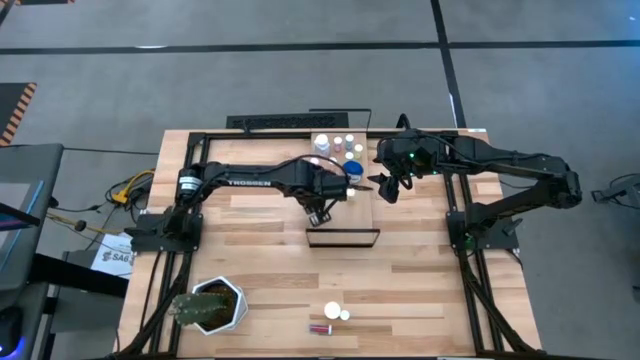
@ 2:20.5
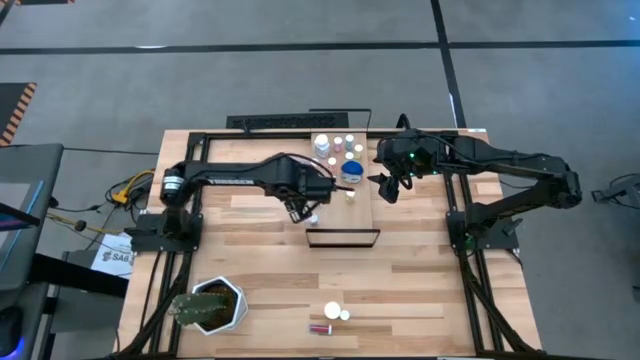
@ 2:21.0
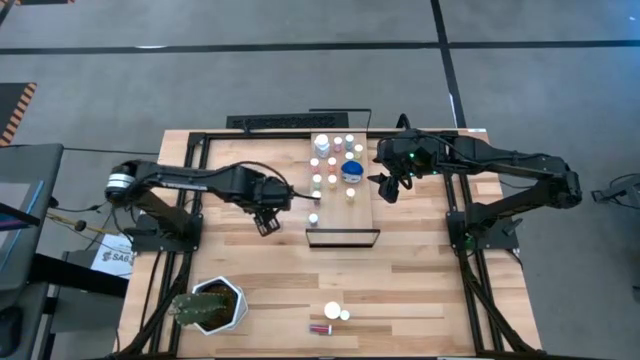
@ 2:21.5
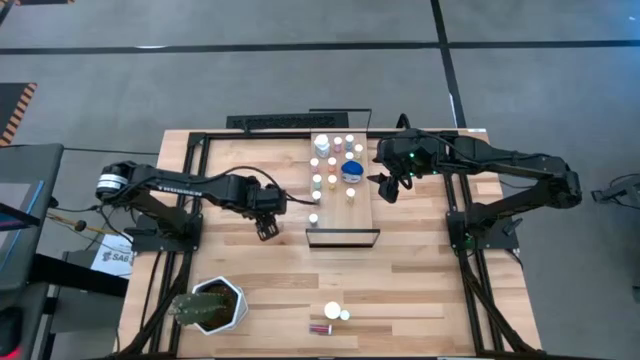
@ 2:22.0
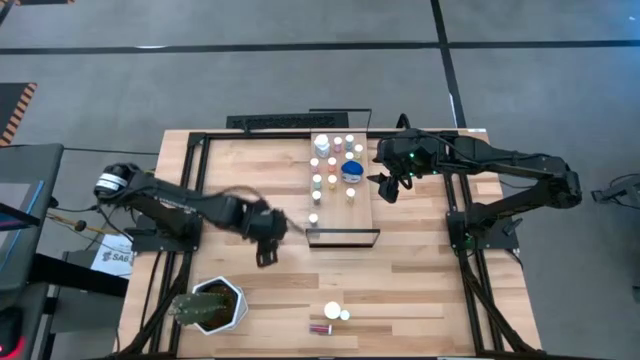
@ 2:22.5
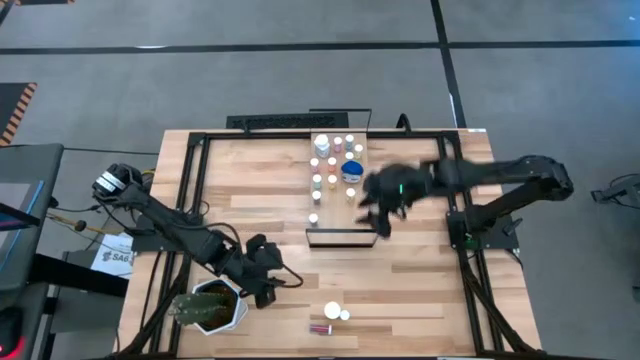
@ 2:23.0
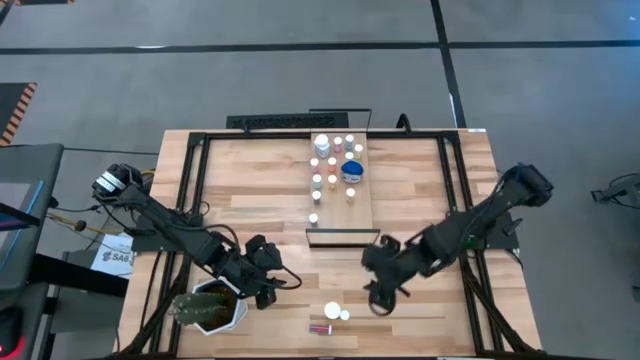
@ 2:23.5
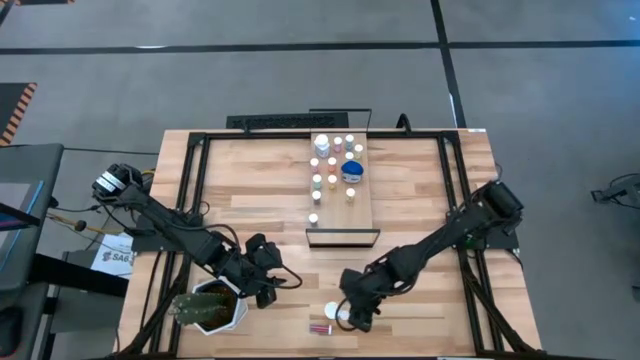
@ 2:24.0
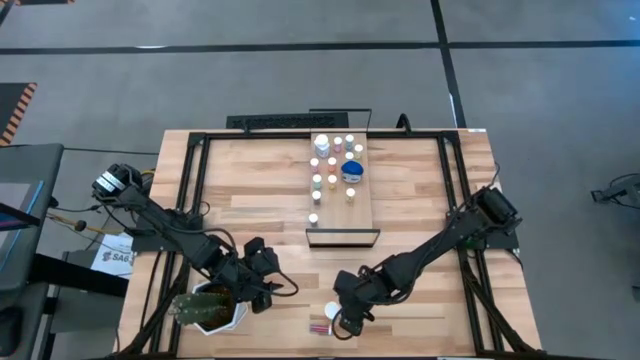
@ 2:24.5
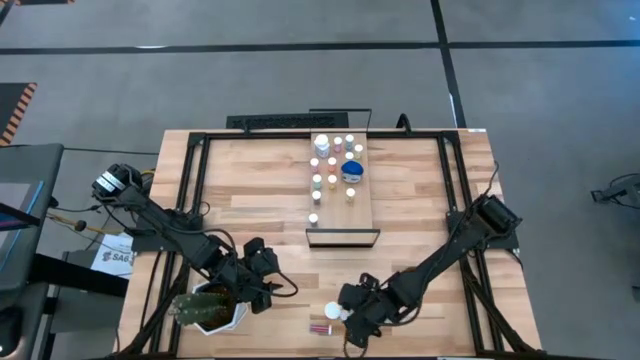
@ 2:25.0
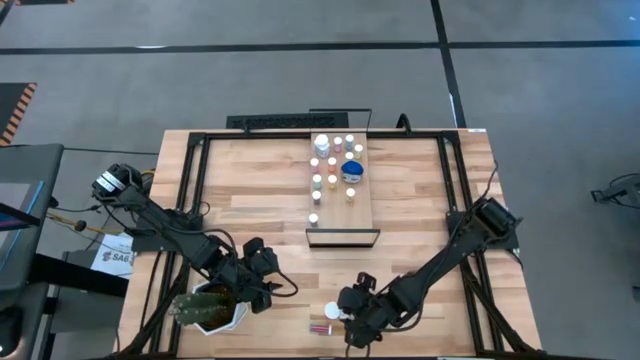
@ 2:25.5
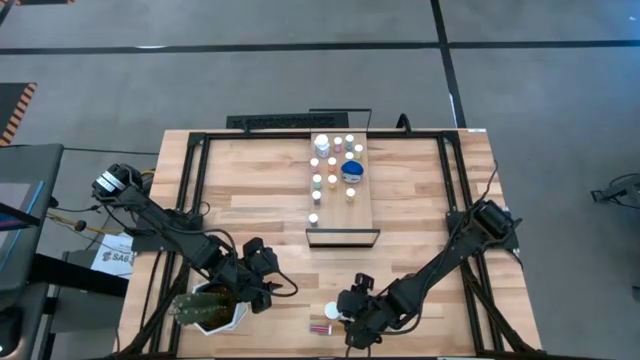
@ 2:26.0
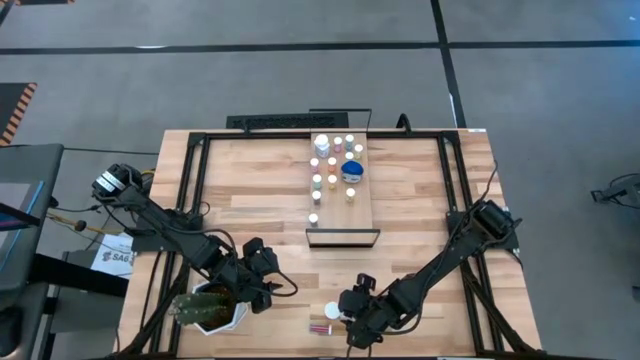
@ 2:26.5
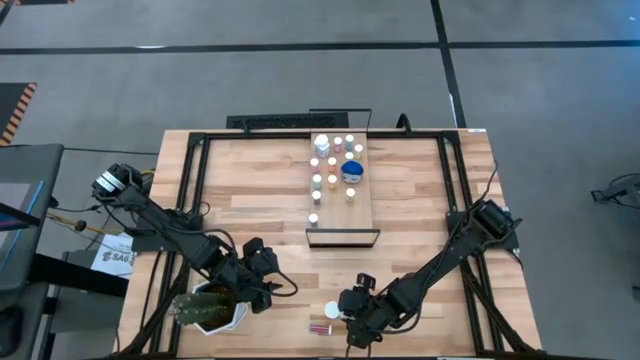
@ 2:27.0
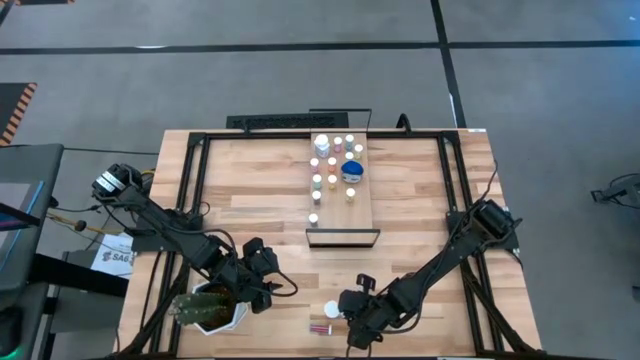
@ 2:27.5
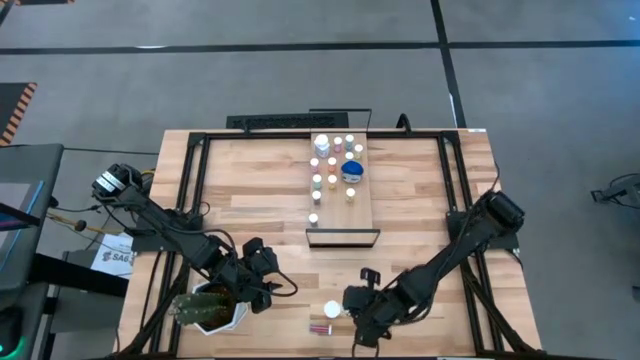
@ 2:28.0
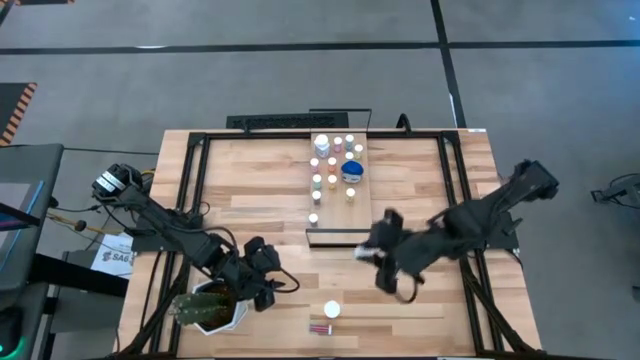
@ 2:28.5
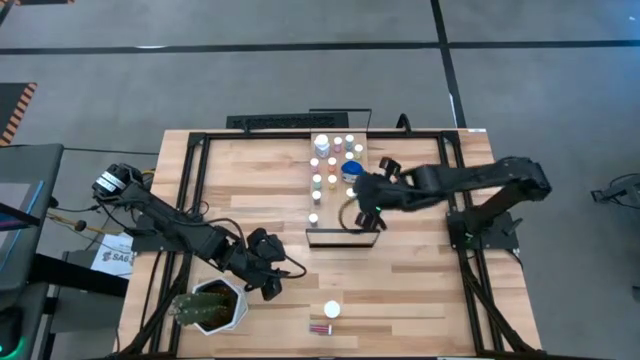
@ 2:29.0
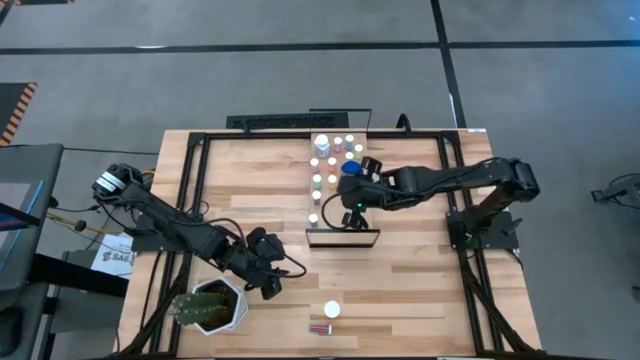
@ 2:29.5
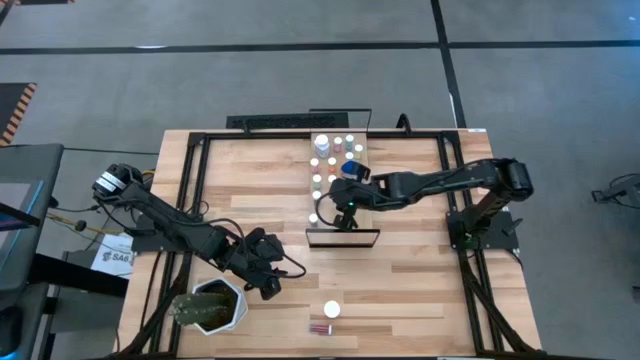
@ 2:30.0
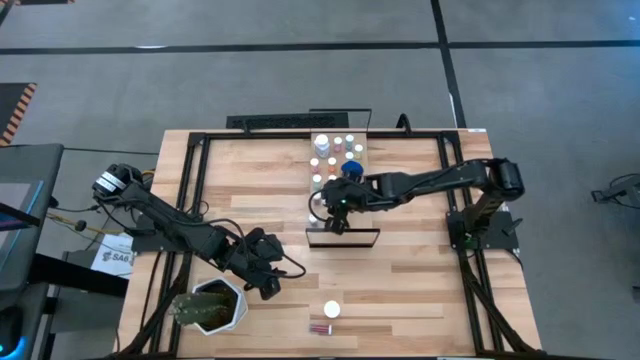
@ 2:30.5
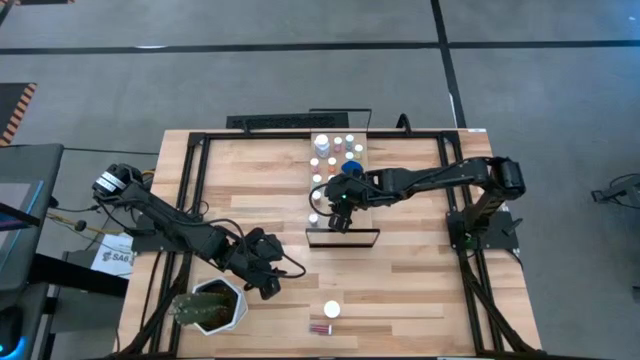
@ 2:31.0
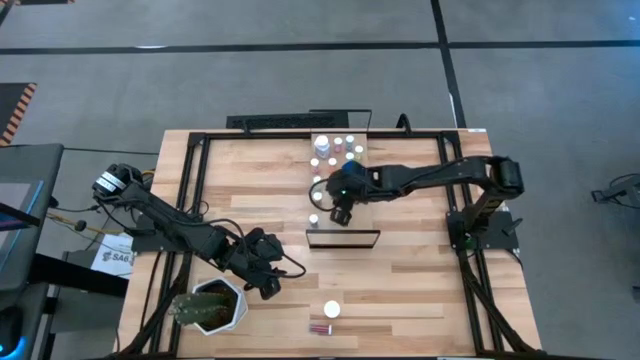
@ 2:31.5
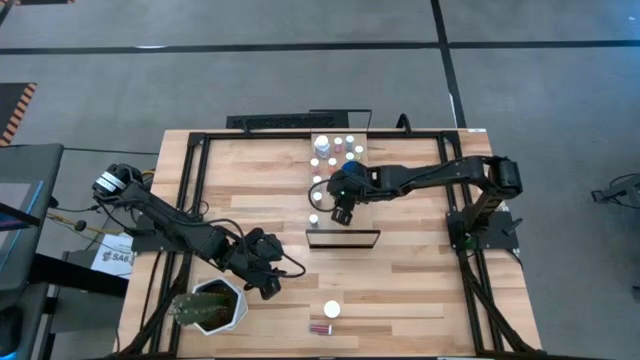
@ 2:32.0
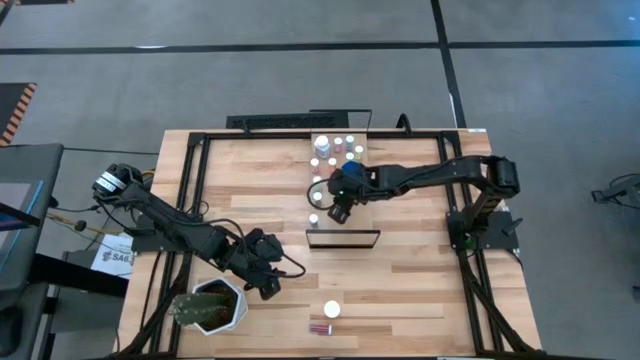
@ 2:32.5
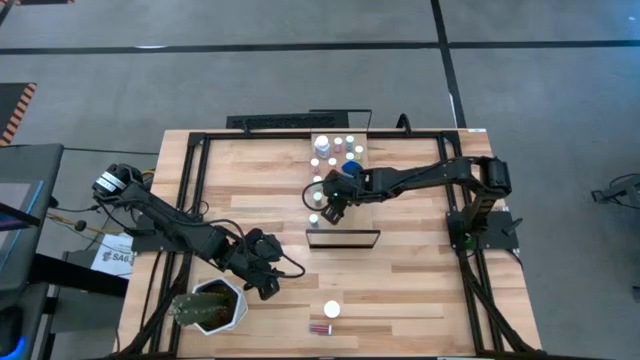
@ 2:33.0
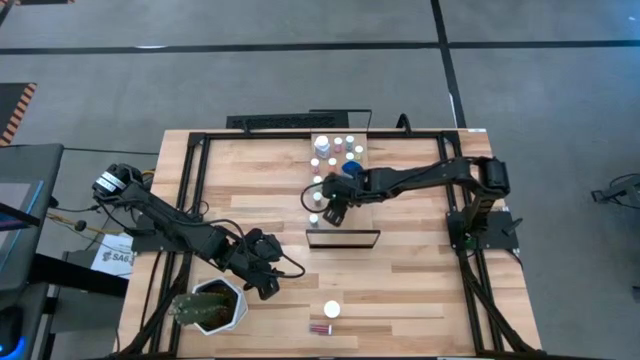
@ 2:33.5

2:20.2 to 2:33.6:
Task: Pick and place medicine bottles onto shelf by color
Put the yellow pill bottle on the shelf

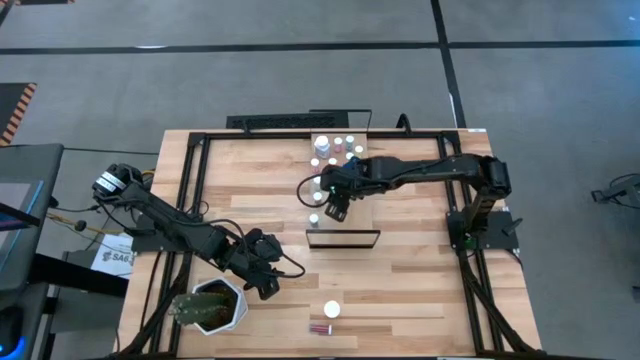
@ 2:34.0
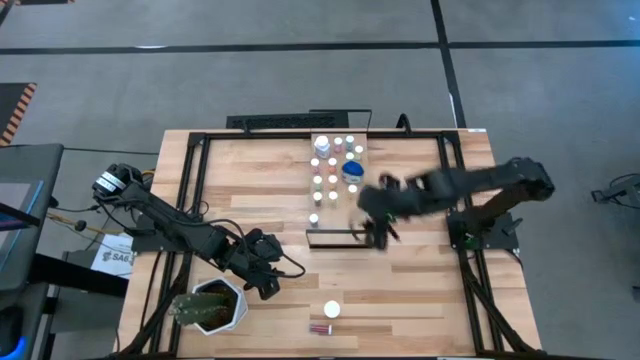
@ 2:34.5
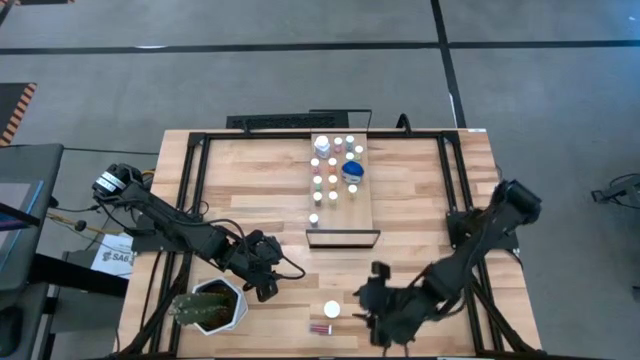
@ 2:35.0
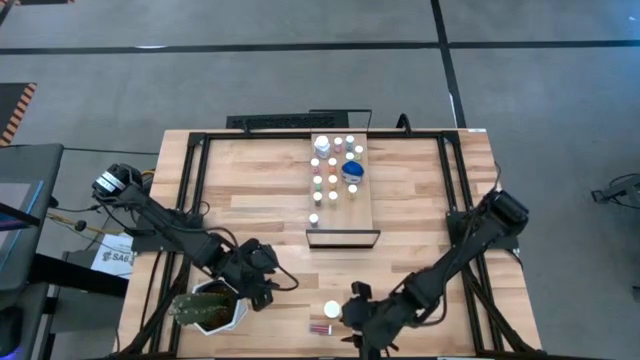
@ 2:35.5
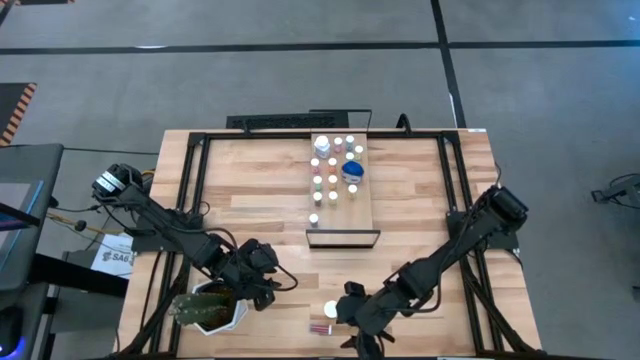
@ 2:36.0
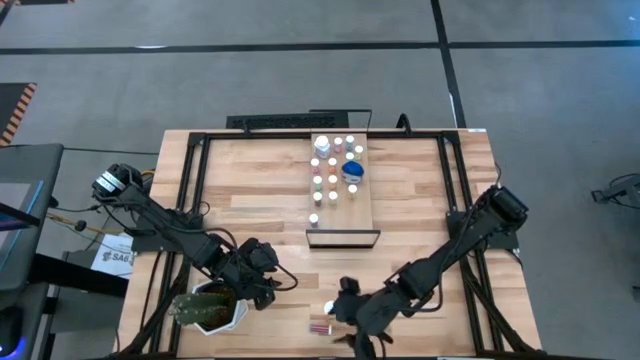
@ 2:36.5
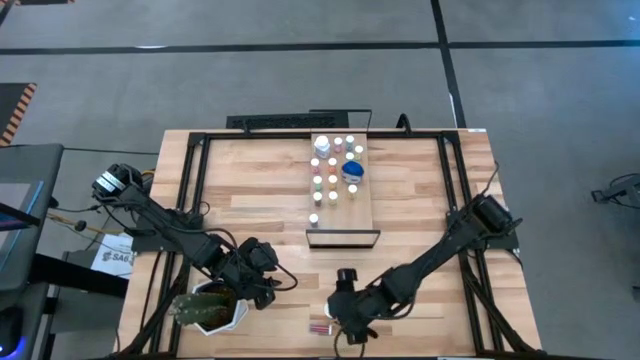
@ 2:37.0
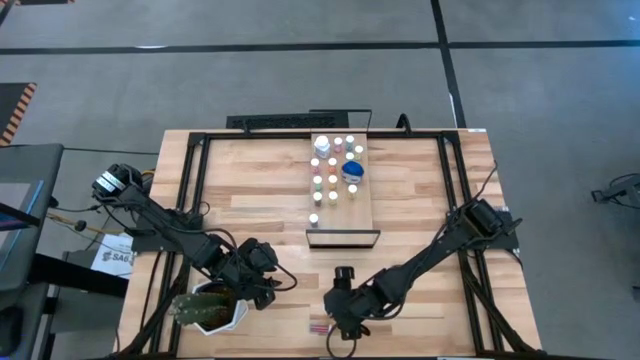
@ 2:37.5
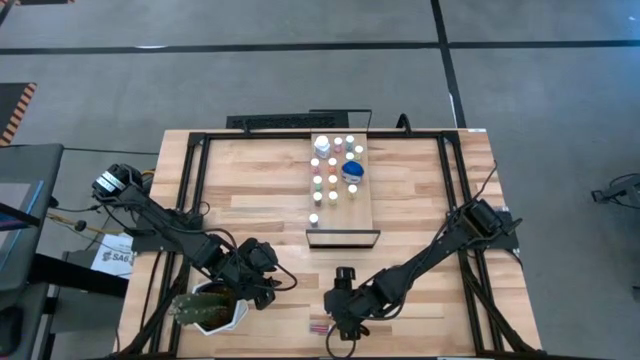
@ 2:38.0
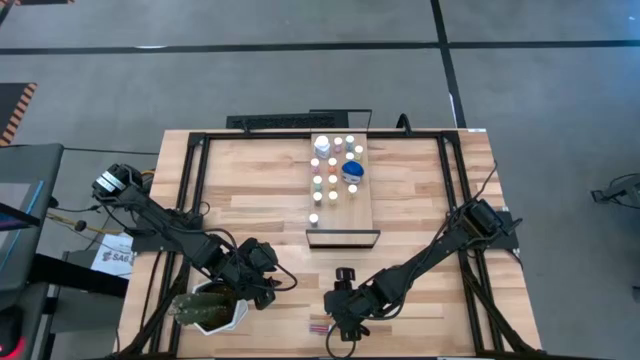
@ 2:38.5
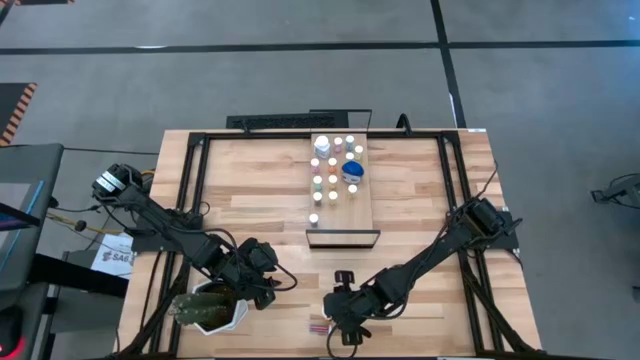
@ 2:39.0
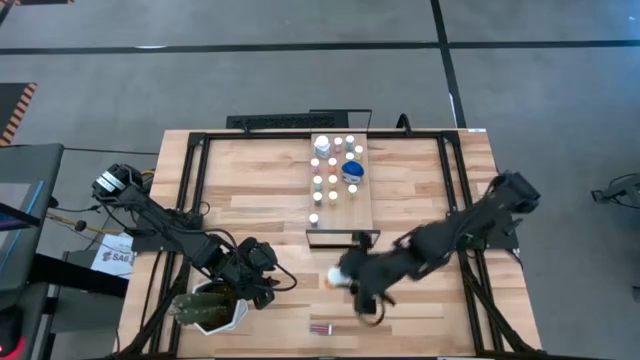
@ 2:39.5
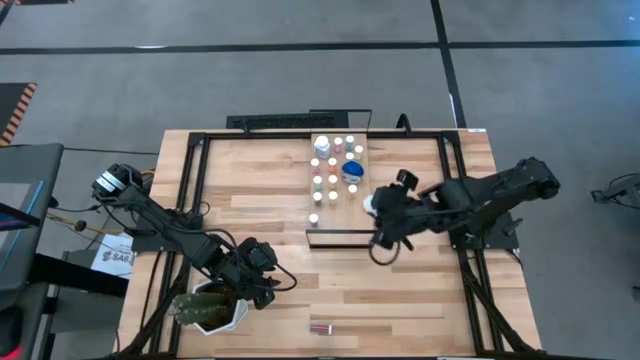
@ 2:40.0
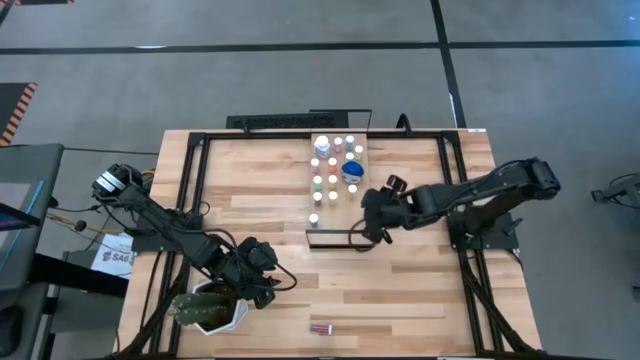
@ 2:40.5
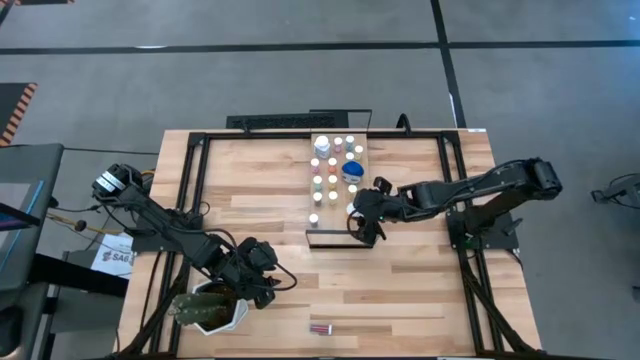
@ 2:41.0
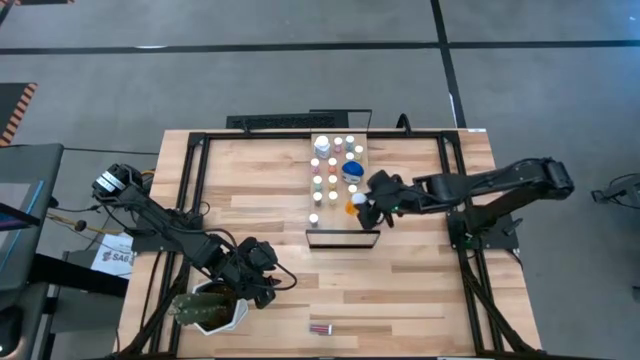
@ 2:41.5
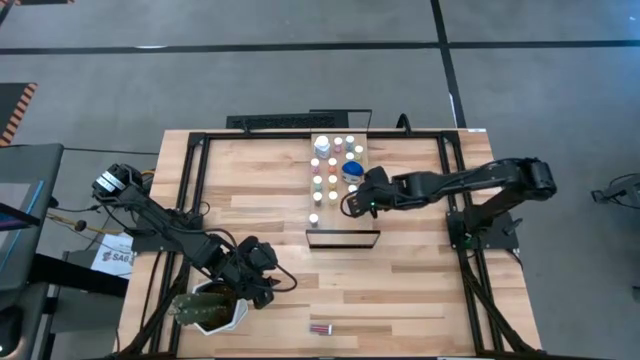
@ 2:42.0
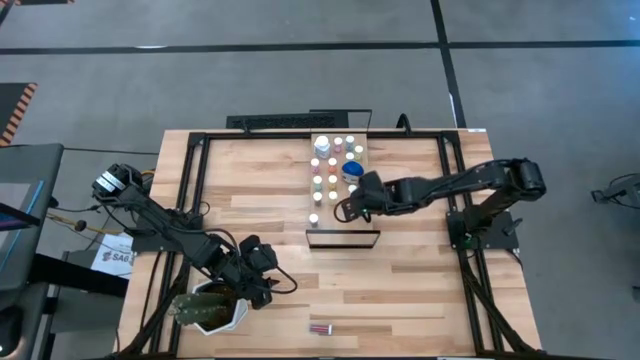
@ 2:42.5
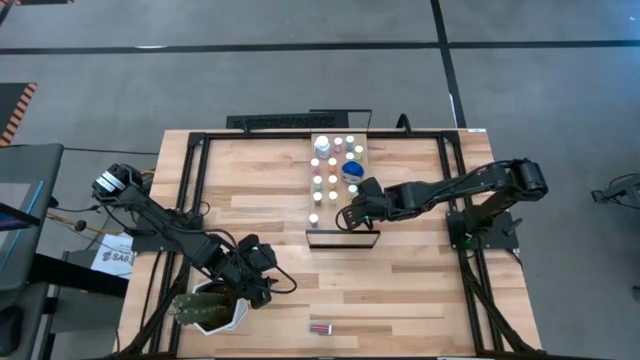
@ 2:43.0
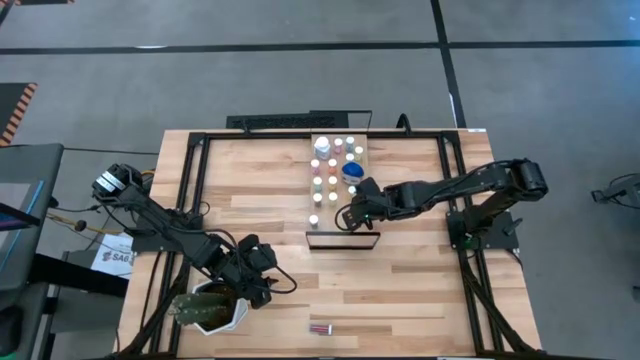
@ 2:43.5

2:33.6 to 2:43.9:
Put the orange pill bottle on the shelf
